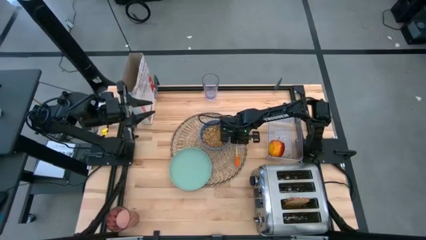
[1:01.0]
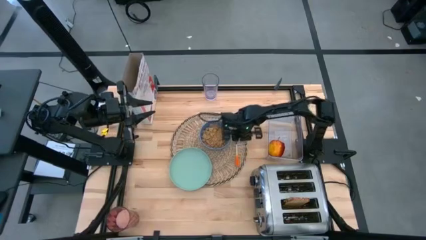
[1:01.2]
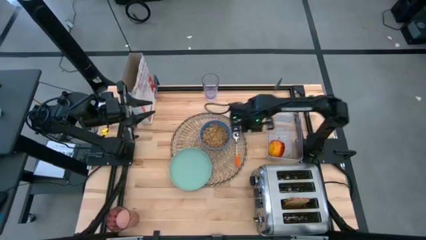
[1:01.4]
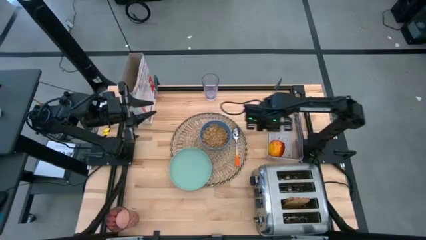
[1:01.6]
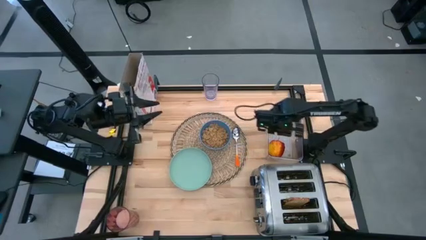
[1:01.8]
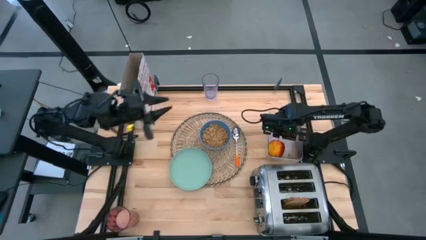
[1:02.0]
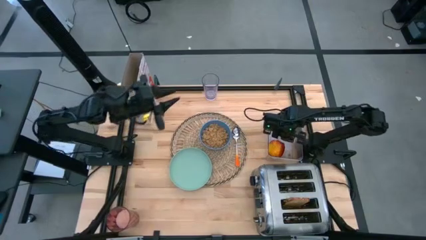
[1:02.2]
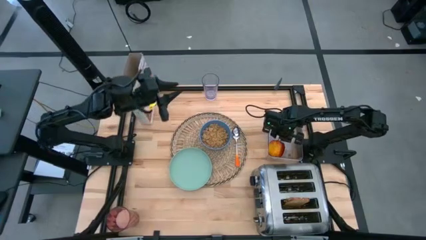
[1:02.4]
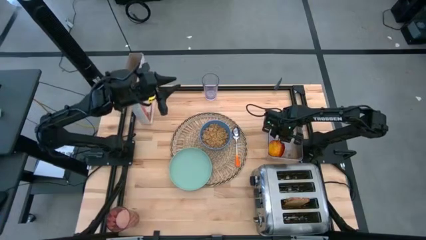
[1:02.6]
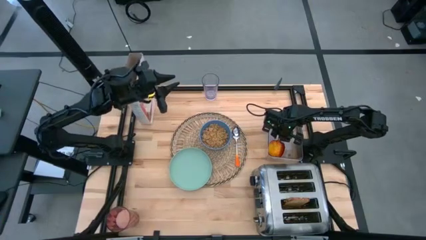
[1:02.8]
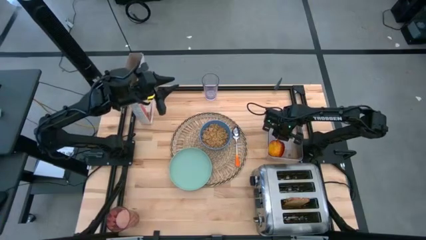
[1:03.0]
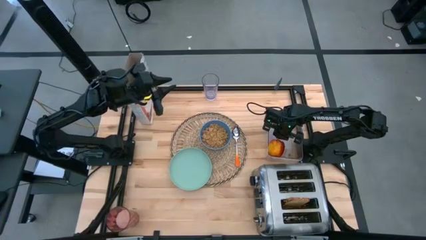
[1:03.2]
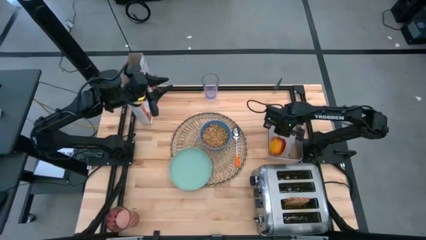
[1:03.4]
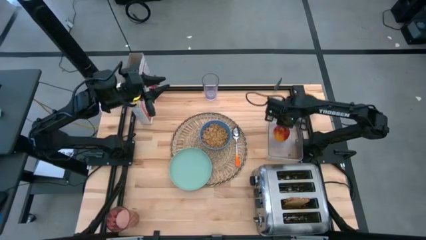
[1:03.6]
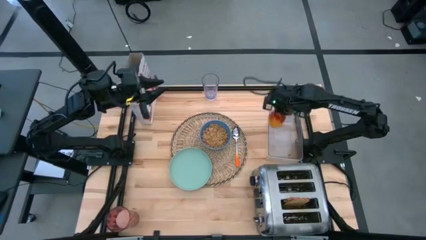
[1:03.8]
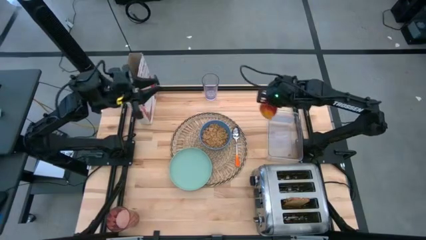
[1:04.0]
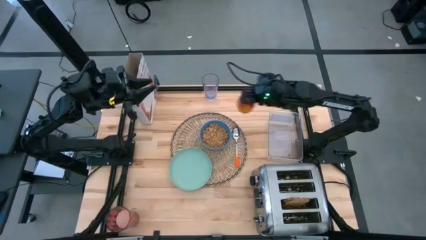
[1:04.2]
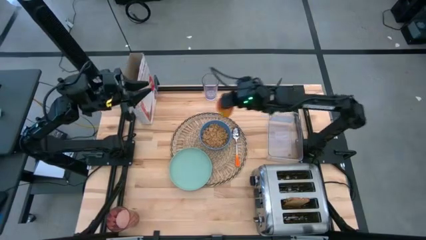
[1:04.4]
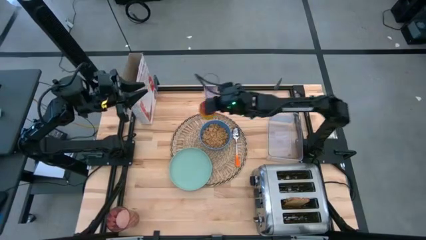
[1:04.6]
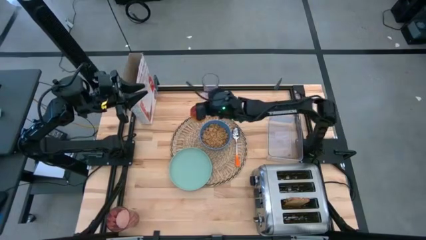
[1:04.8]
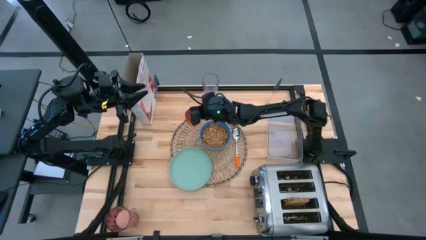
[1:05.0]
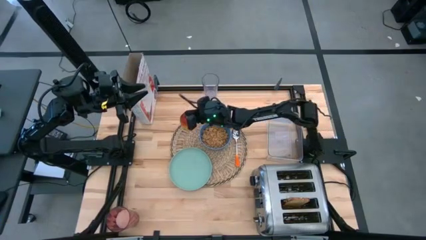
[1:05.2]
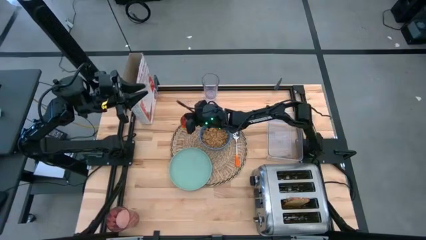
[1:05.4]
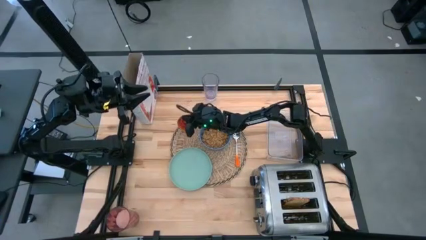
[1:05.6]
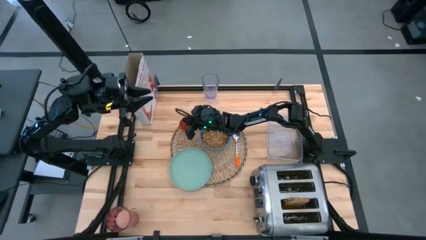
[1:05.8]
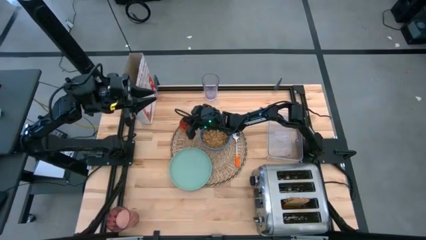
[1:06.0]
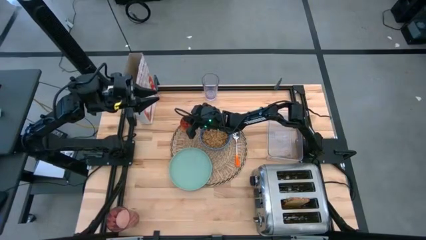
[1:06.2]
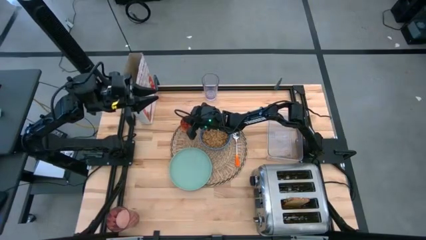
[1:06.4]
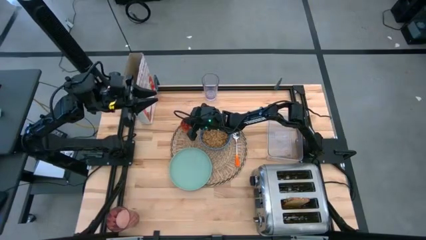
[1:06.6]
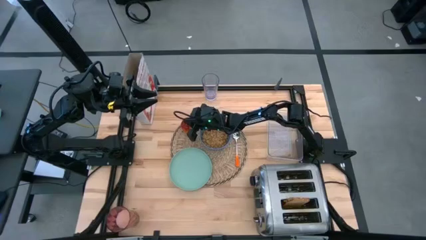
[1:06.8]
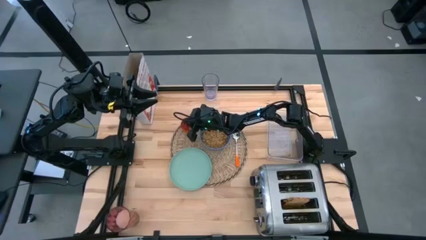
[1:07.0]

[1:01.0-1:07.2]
Task: Arrange a breakfast setting
Put the apple on the table mat

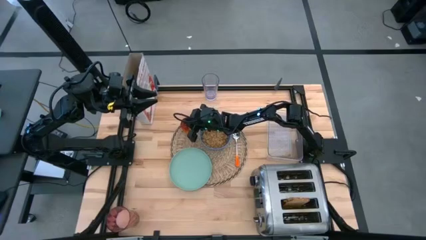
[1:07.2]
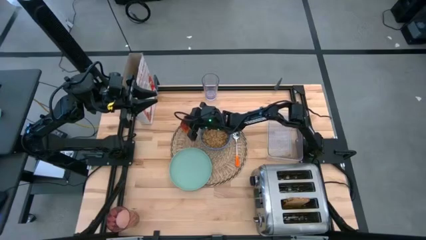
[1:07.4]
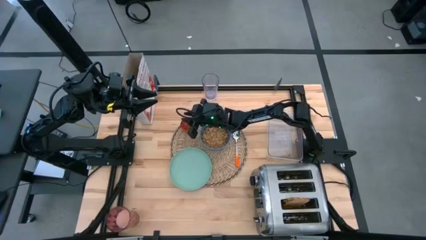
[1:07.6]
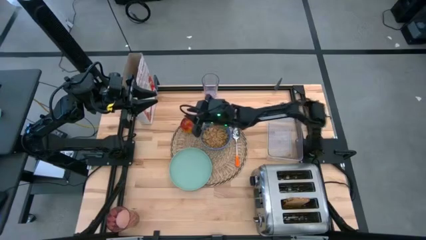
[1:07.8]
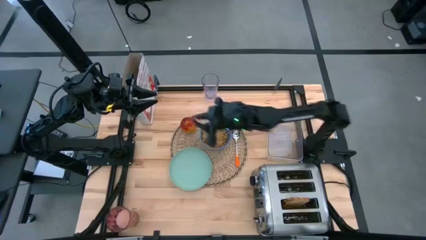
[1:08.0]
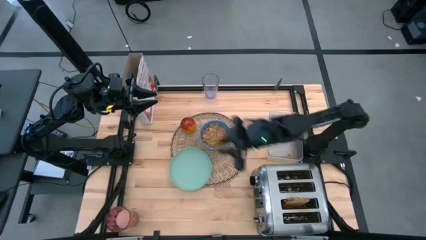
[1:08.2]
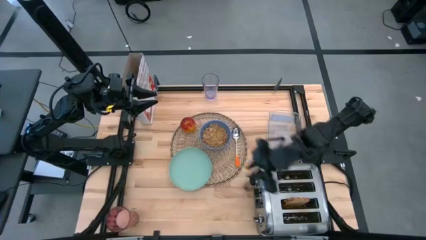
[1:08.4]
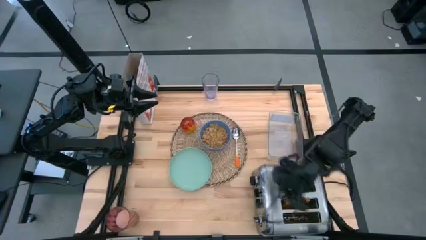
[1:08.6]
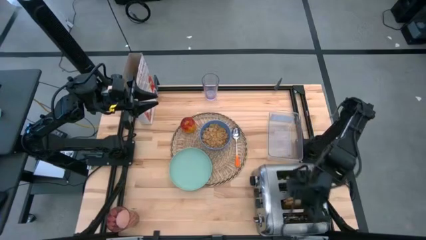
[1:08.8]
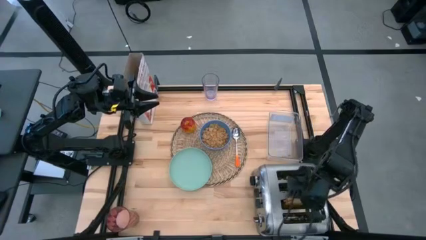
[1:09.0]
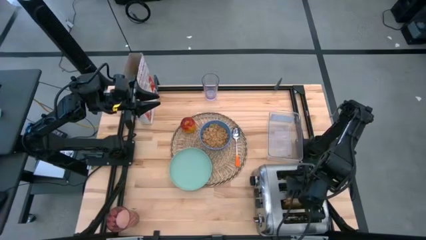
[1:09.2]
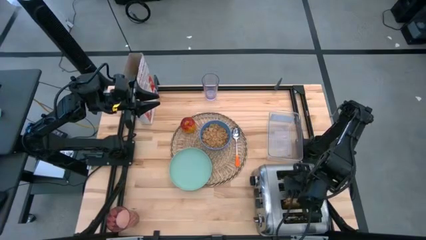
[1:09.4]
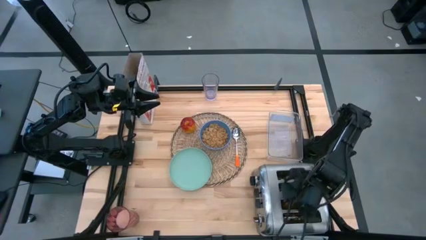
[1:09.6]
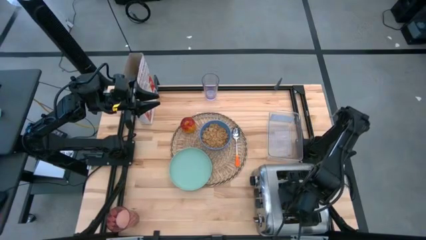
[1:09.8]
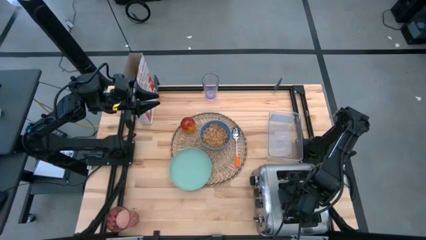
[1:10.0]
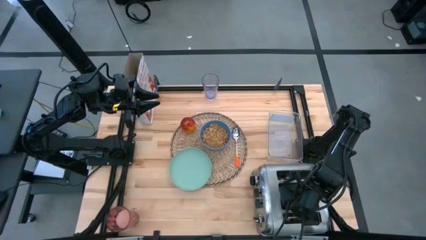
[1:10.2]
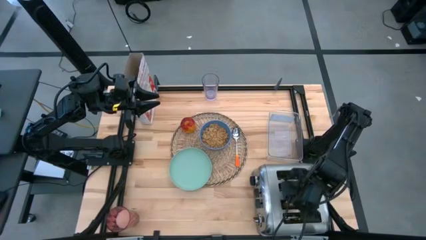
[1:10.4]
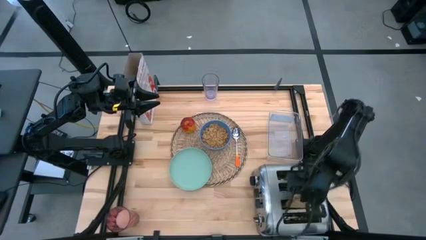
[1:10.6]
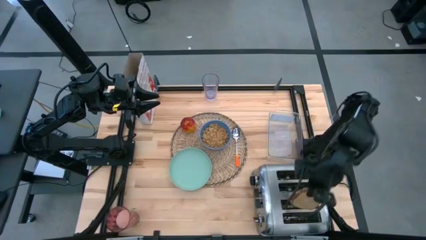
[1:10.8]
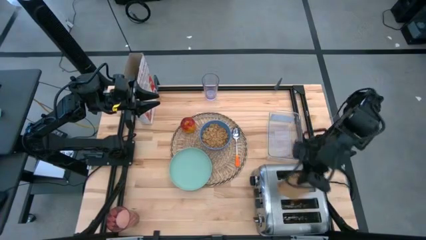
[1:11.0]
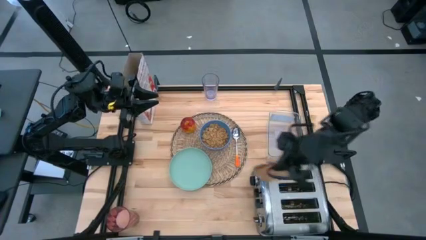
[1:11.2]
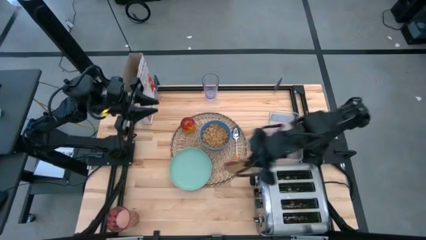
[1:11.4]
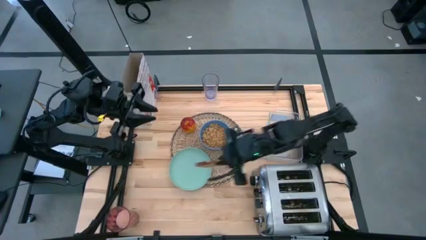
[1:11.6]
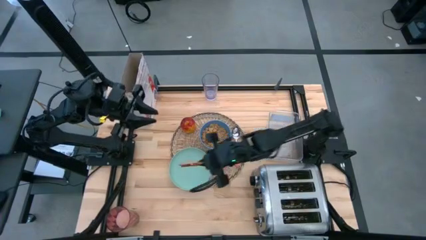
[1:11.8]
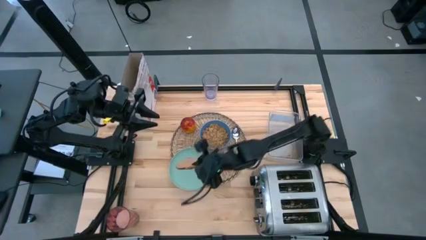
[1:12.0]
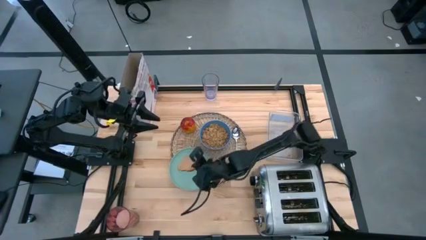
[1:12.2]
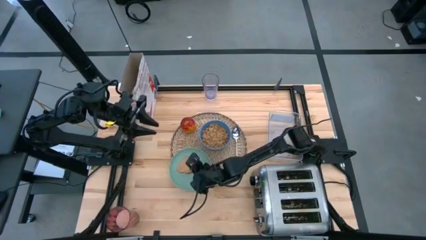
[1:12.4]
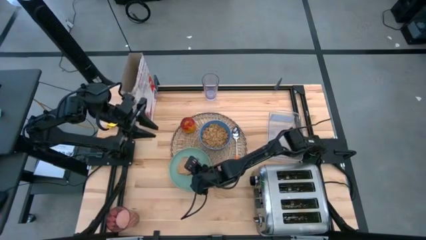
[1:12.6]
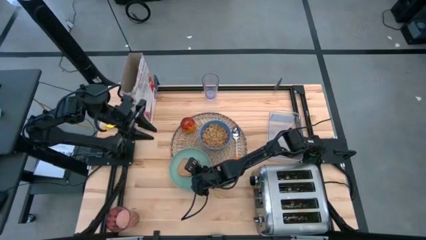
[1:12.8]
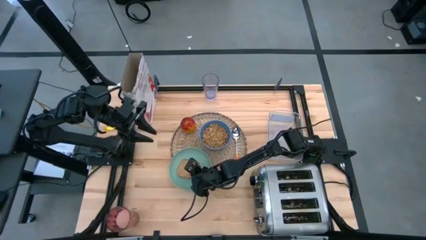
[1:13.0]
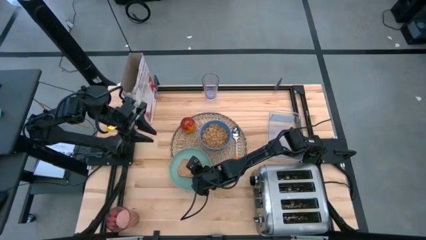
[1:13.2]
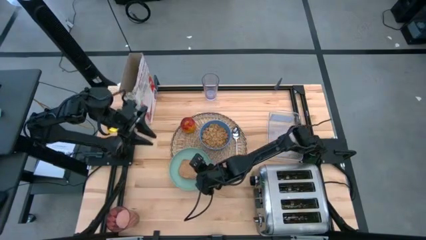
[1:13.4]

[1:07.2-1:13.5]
Put the toasted bread on the green plate

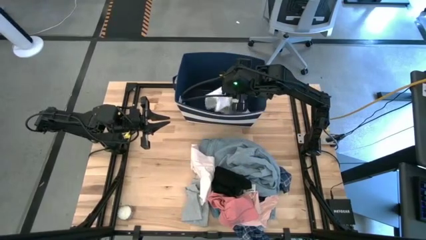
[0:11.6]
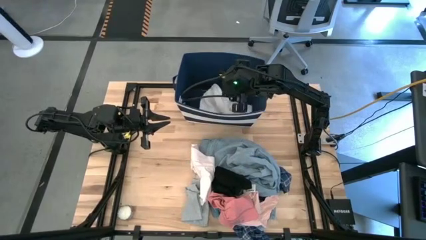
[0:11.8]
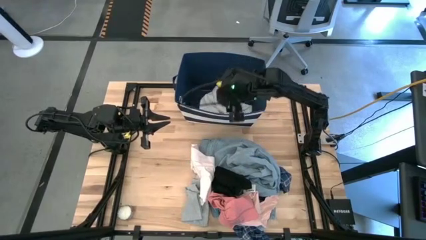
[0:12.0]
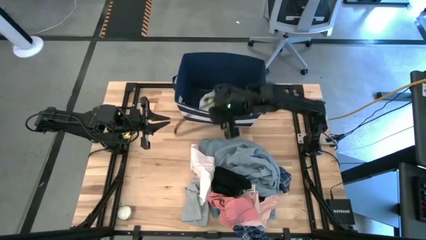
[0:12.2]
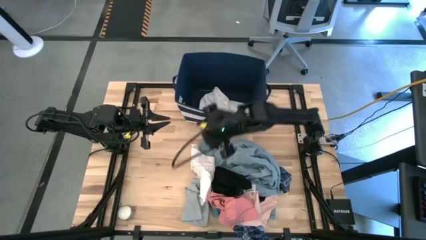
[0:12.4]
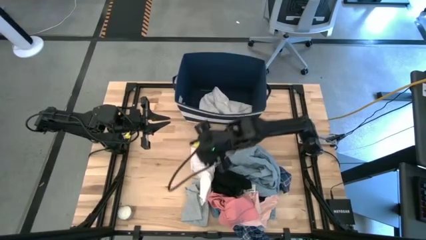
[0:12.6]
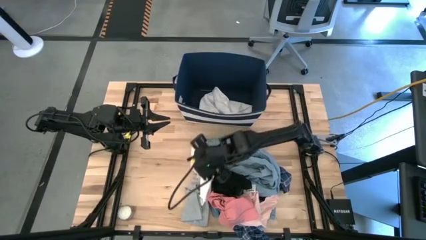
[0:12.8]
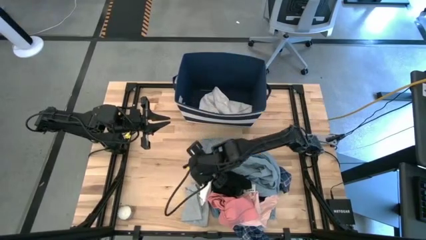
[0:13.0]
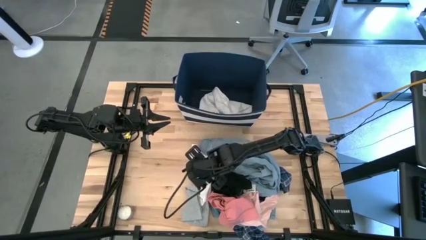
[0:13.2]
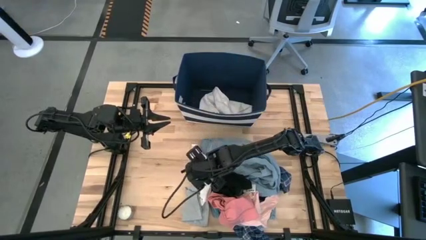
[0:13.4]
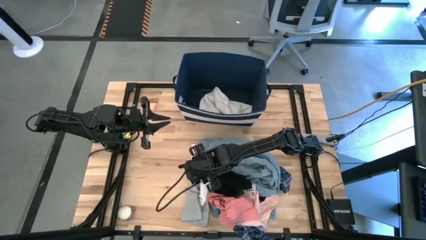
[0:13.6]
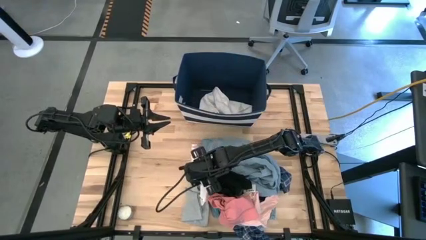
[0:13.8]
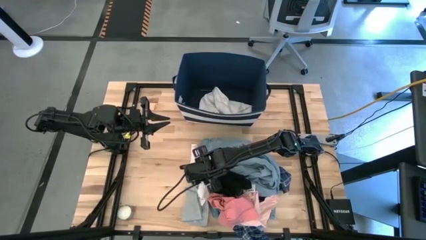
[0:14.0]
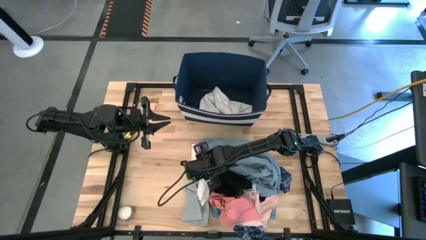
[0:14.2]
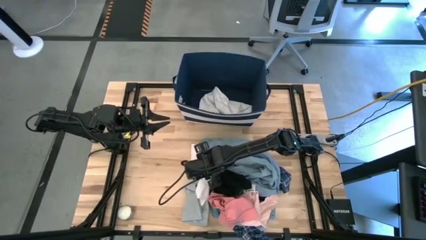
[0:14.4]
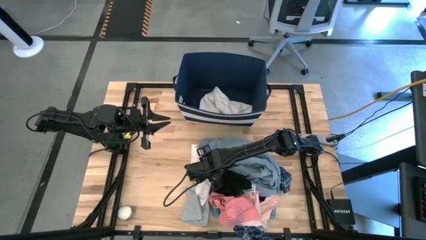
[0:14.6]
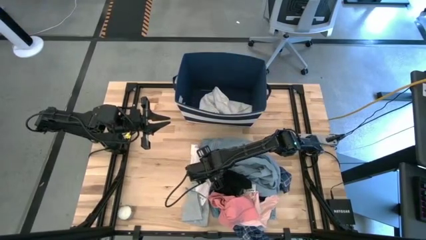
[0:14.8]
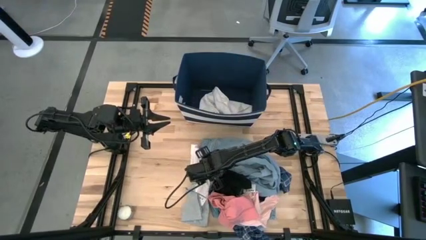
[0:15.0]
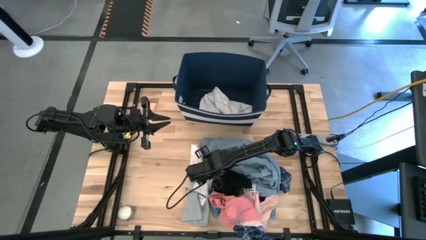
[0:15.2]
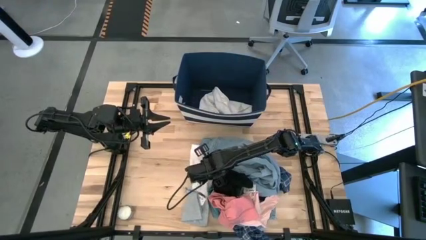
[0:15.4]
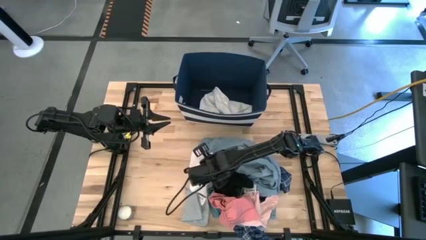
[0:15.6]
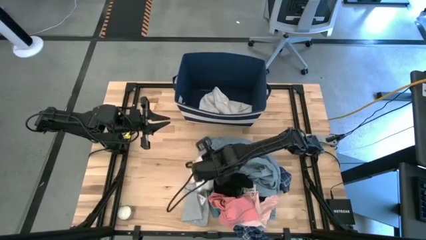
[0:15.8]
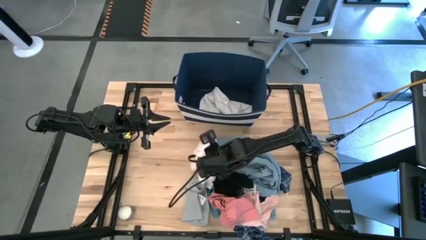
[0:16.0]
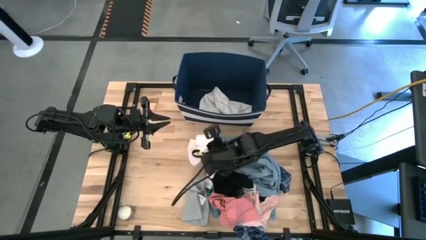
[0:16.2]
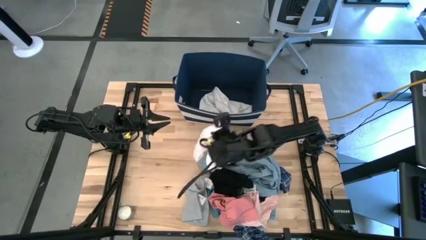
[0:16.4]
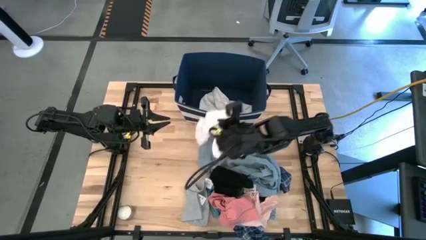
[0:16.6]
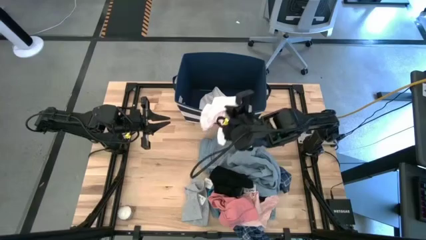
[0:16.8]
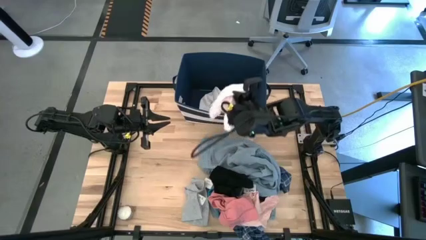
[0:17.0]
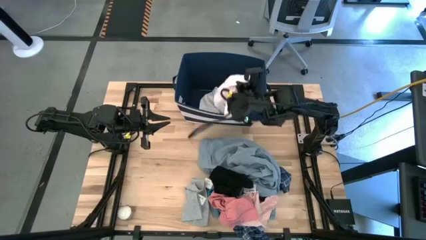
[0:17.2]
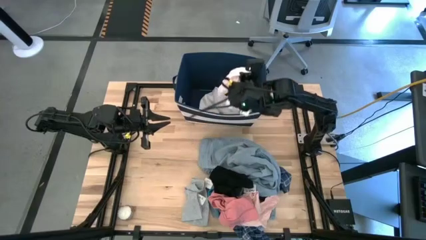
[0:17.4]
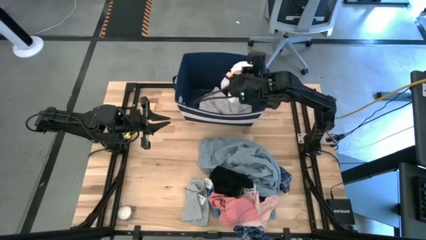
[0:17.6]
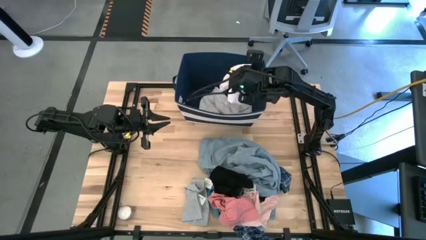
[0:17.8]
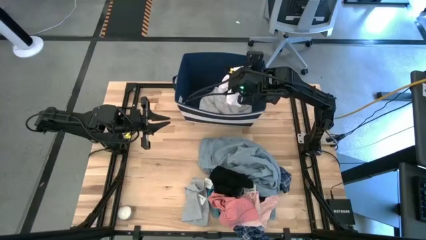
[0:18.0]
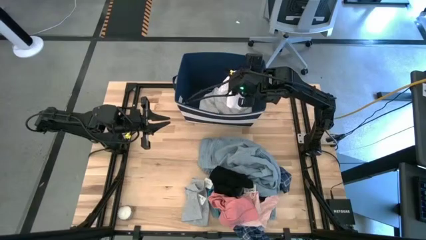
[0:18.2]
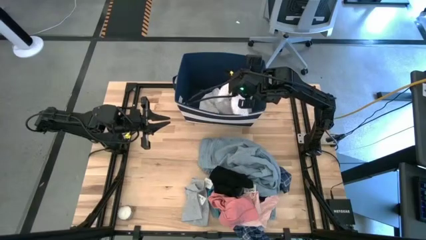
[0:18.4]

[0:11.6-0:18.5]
Task: Sort clothes
Put the light pink shorts into the blue bin
